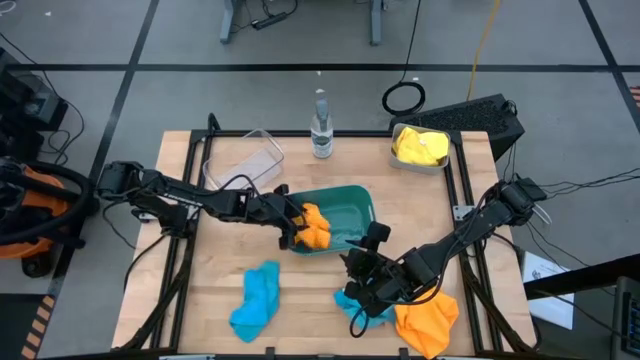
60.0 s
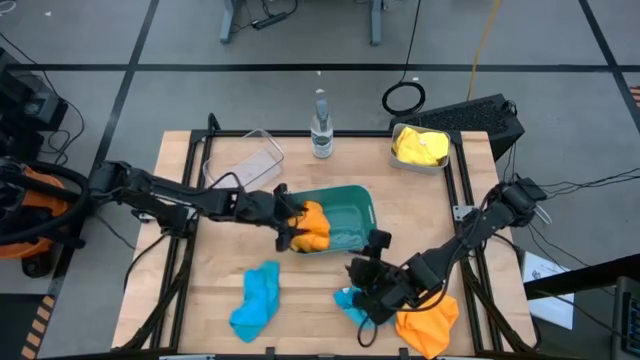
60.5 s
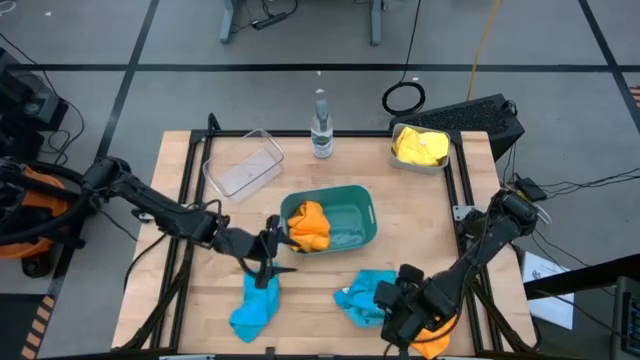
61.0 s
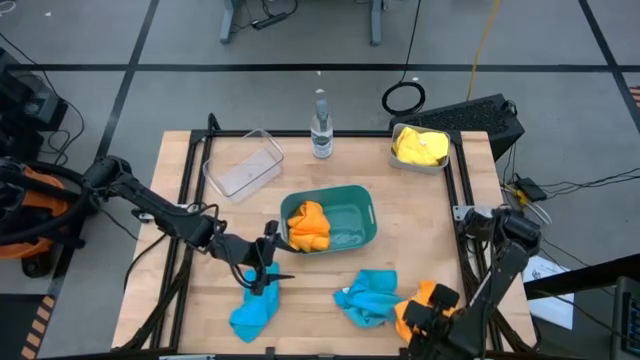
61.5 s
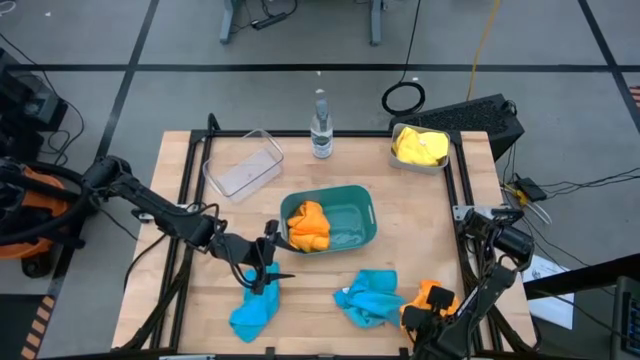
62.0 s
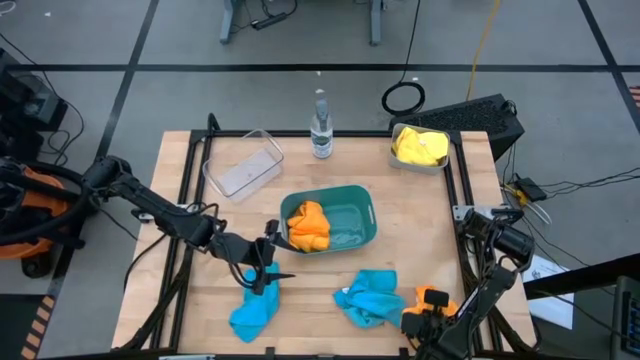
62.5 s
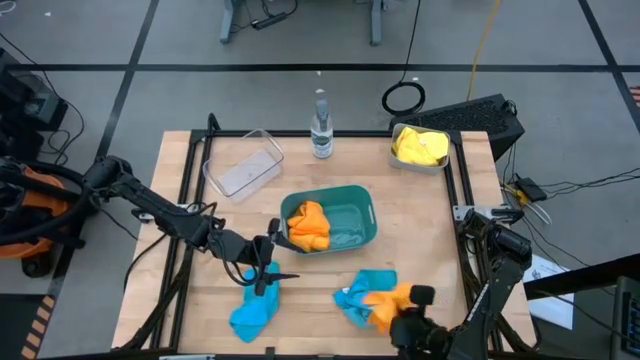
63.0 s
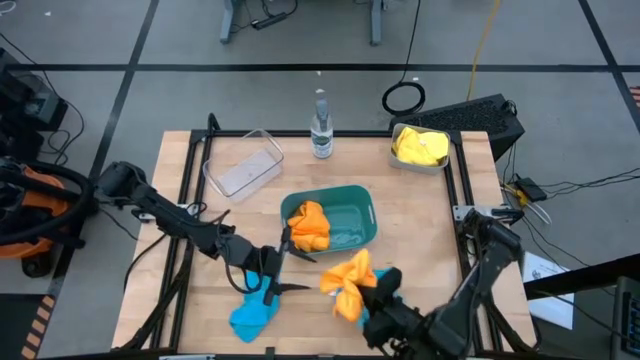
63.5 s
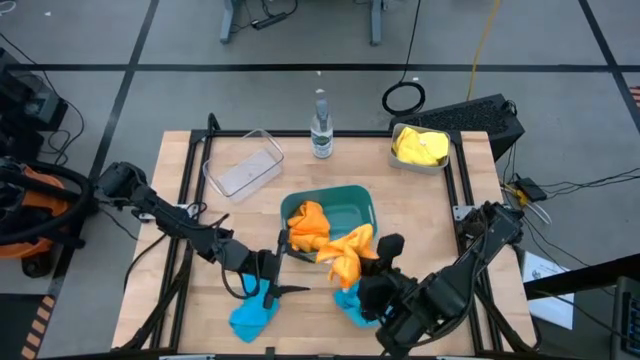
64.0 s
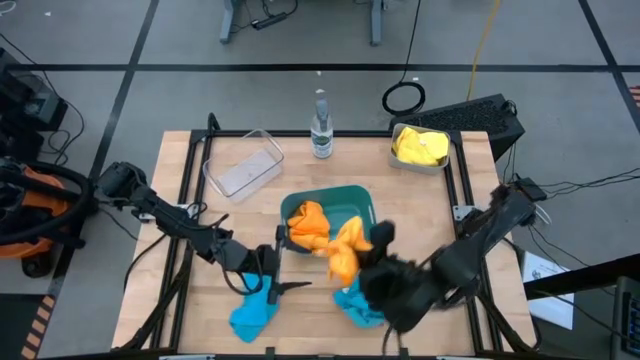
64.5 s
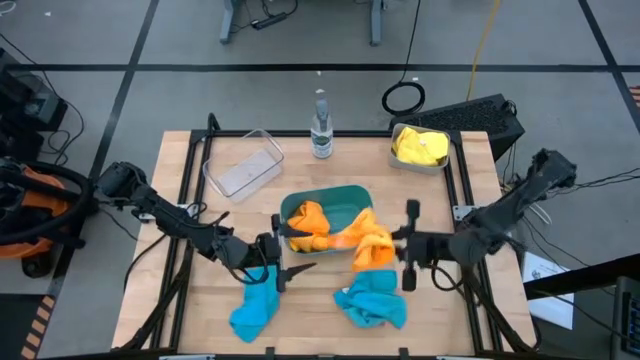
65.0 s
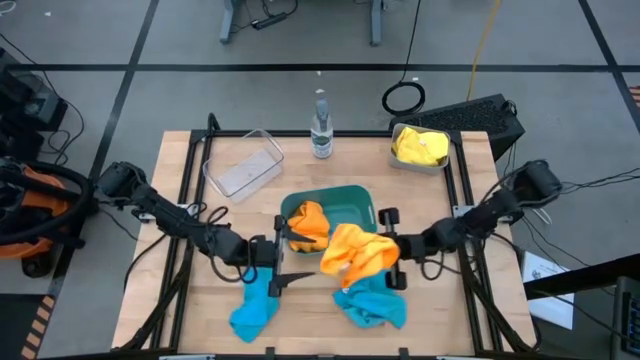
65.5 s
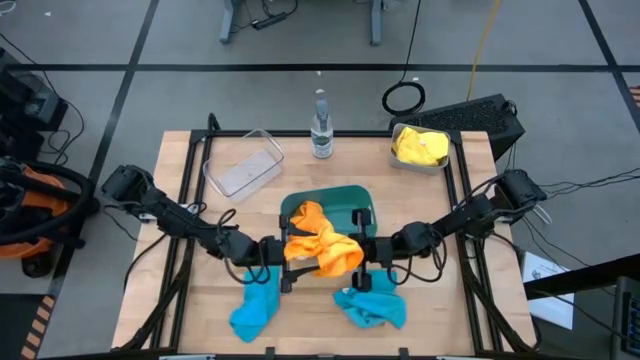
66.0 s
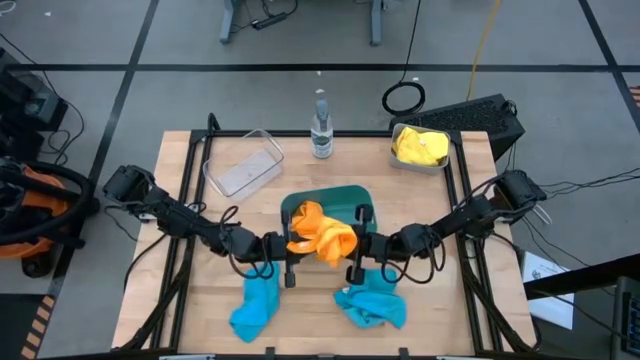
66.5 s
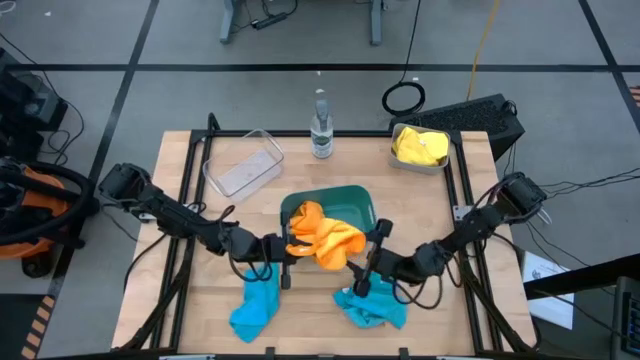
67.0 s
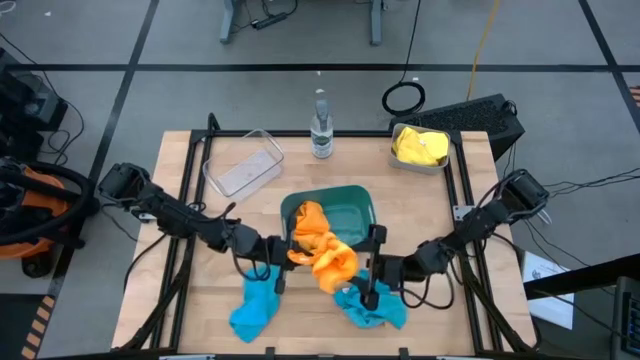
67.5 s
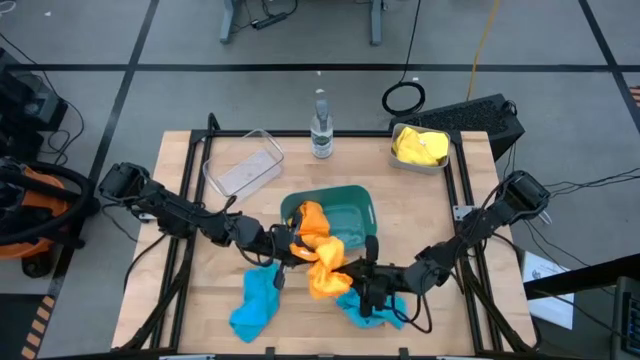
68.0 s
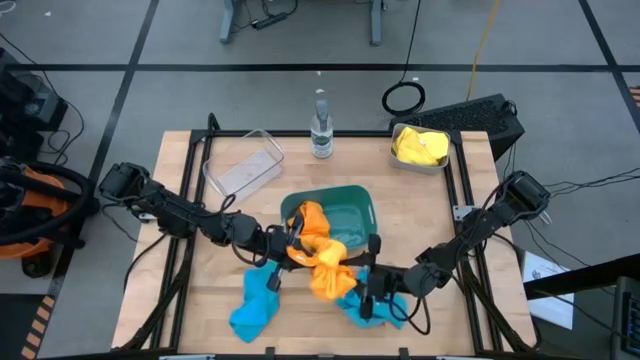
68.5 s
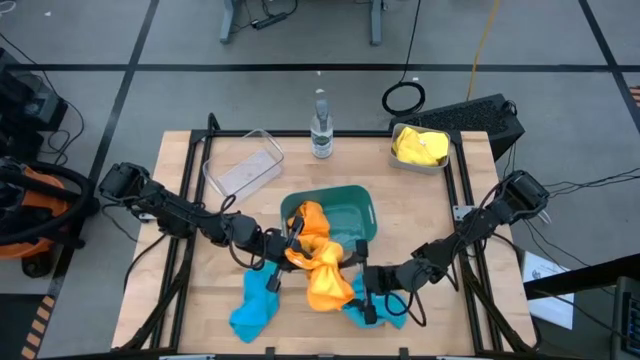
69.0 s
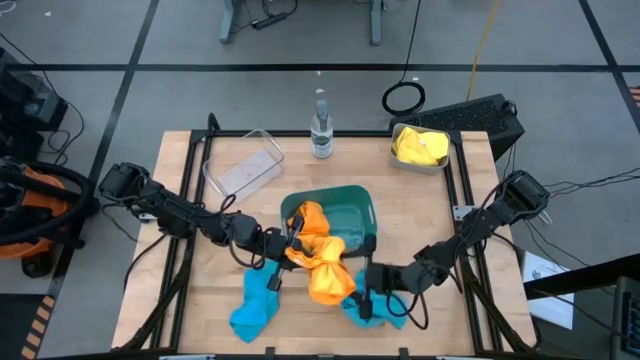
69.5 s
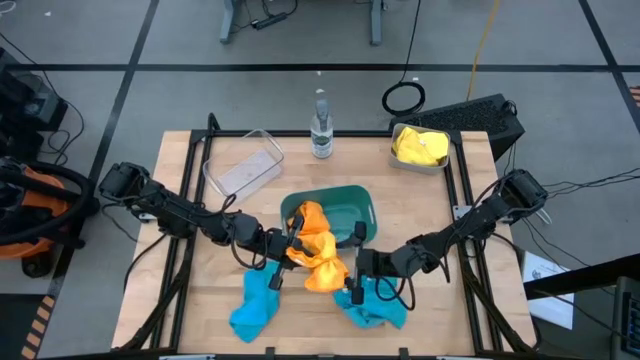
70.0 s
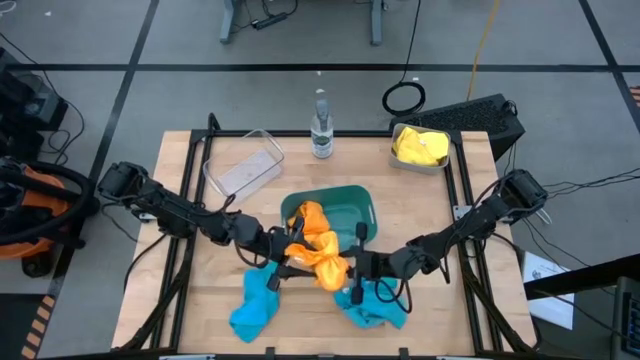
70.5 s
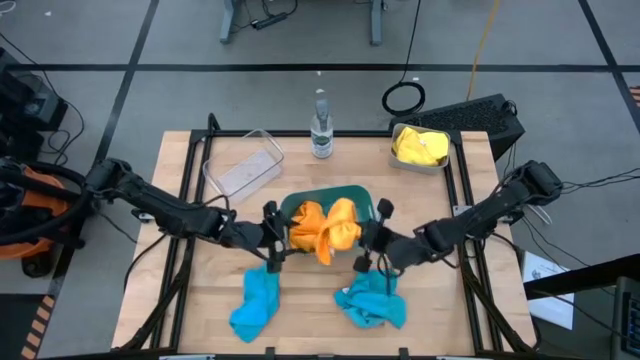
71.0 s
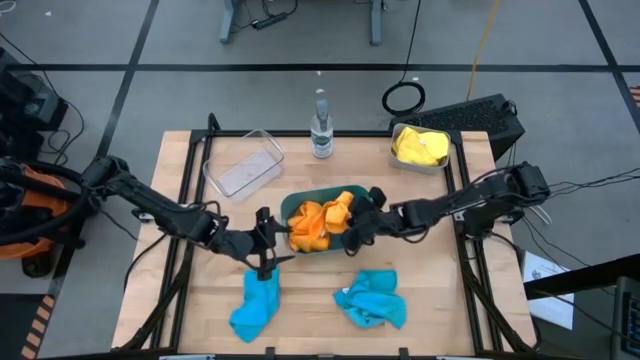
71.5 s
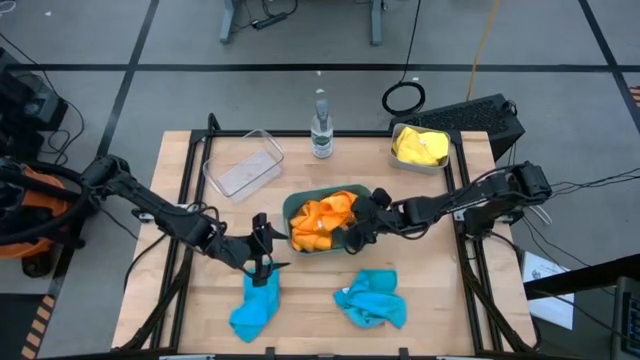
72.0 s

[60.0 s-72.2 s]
Task: Sort microfiber towel by color & place in baskets
Put the orange towel into the green bin

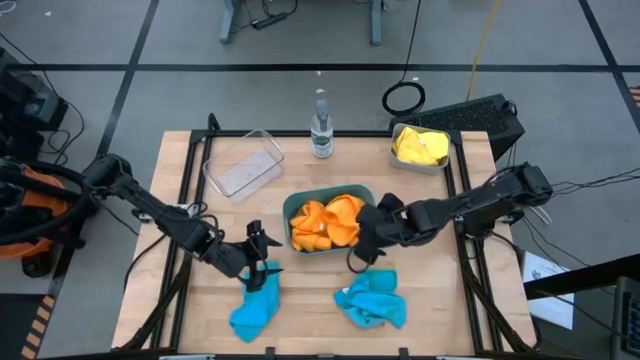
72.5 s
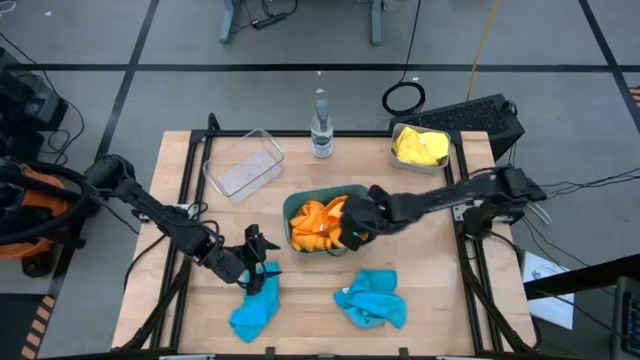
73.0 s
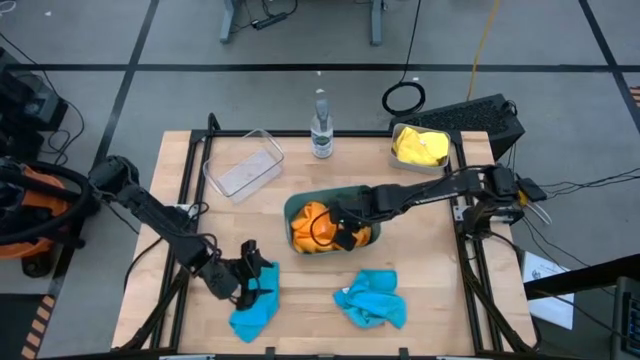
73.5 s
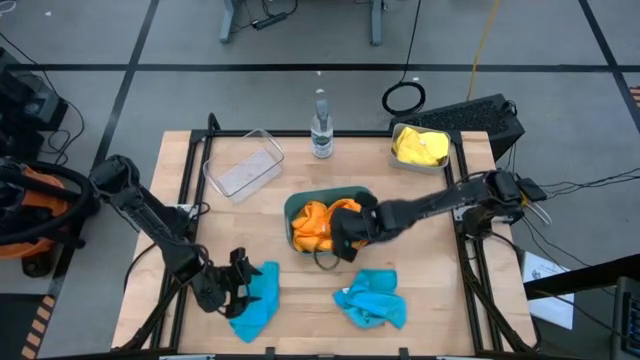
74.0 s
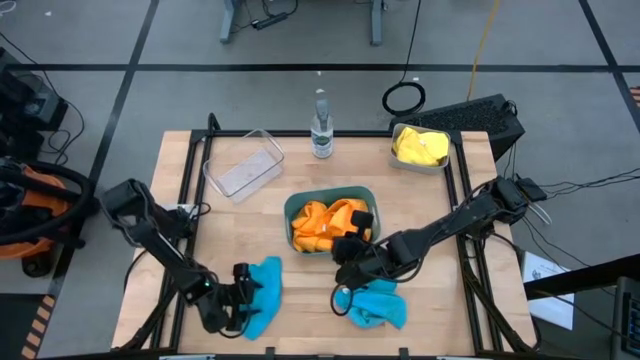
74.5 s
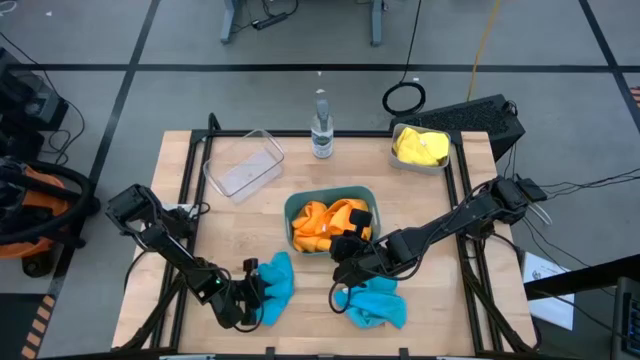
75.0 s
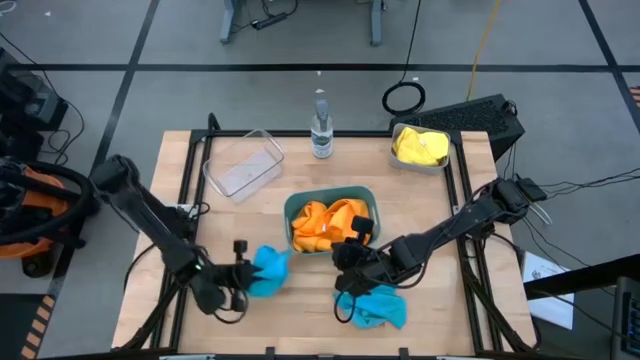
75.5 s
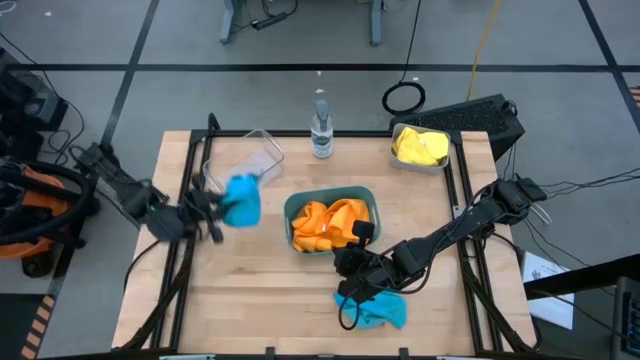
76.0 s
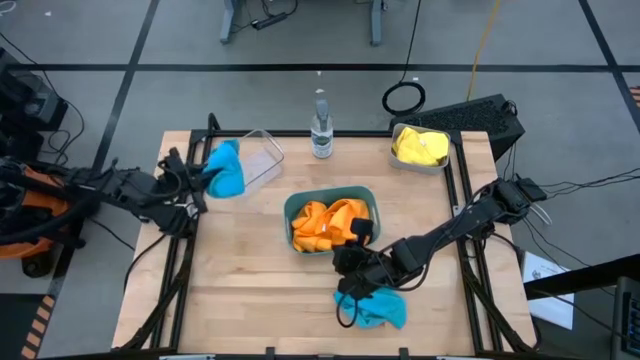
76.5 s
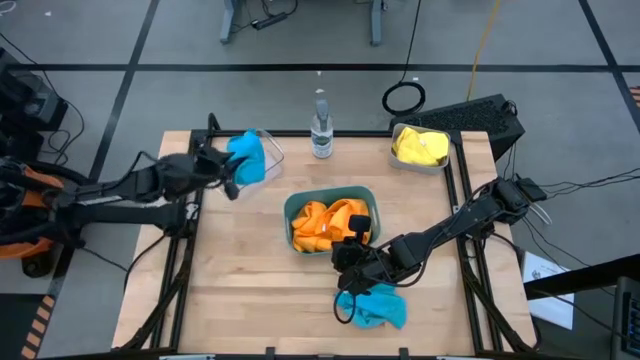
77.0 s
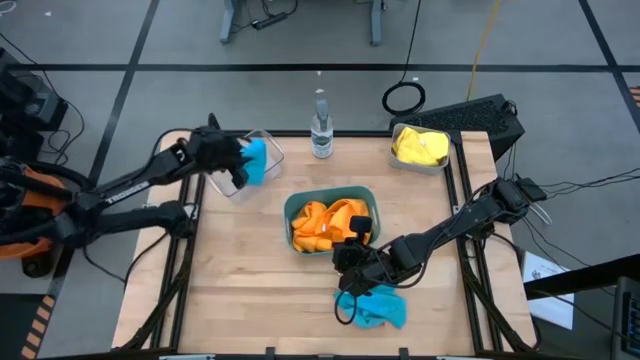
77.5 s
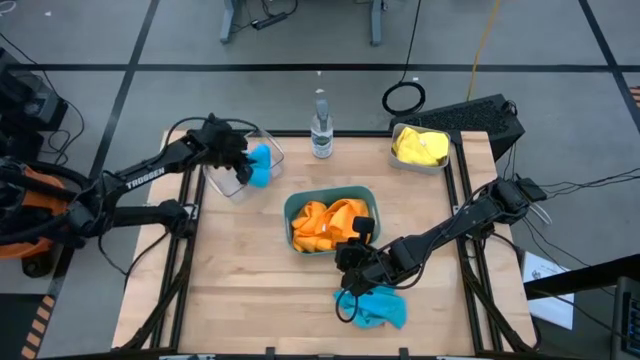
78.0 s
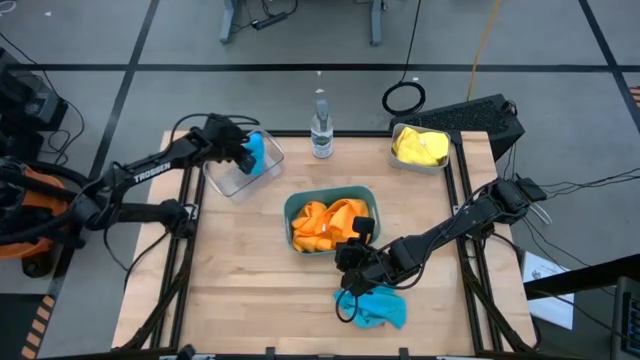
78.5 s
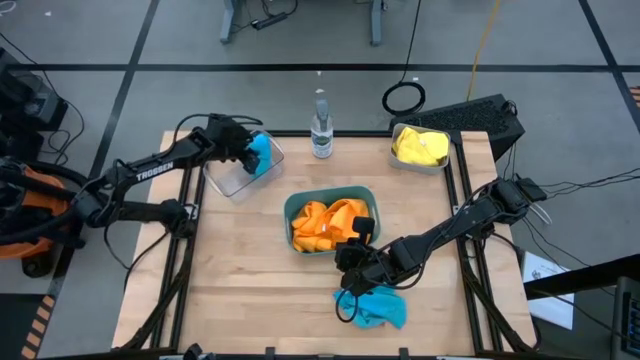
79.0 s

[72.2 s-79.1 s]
Put the left blue towel into the transparent bin

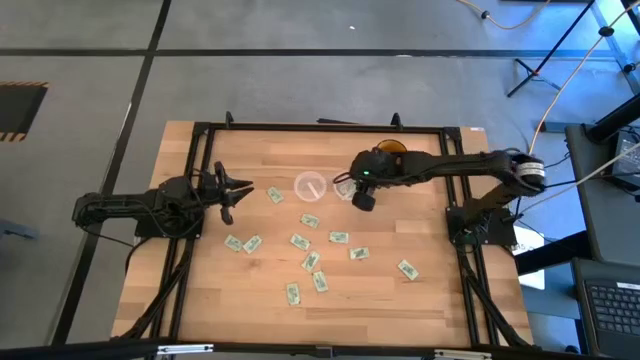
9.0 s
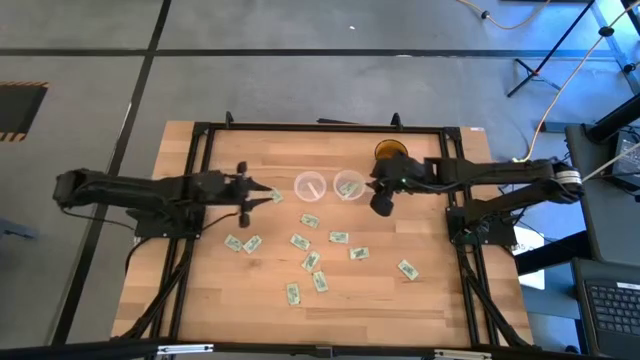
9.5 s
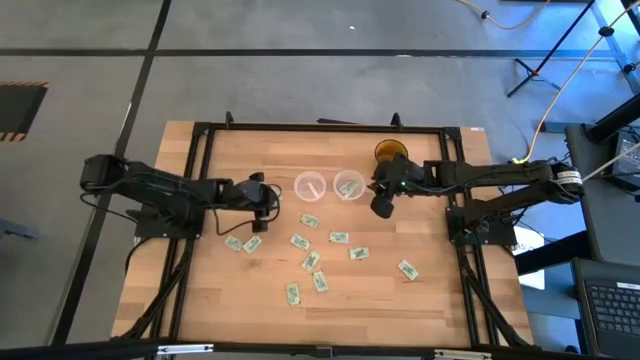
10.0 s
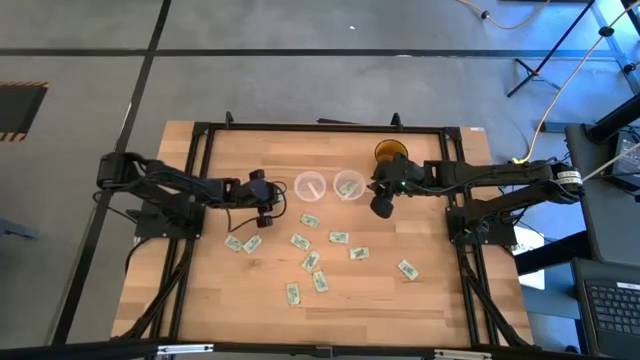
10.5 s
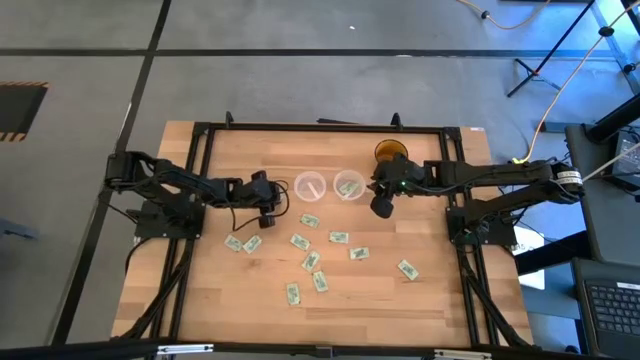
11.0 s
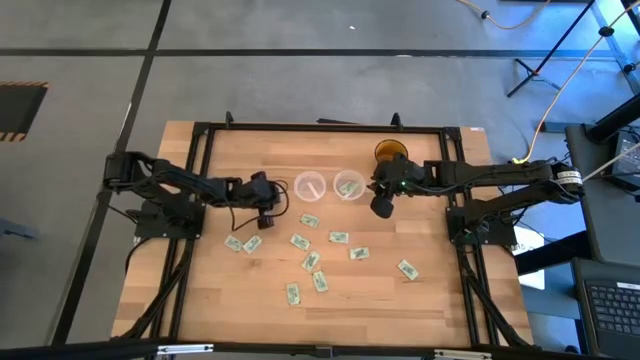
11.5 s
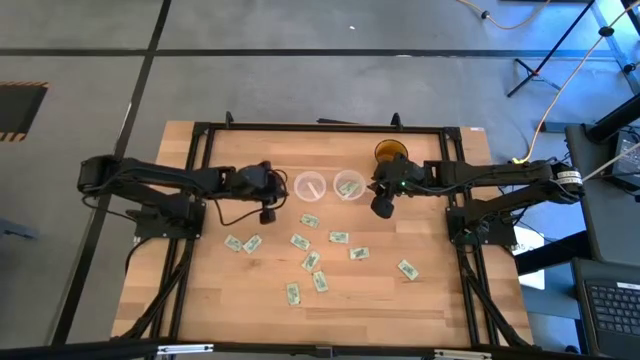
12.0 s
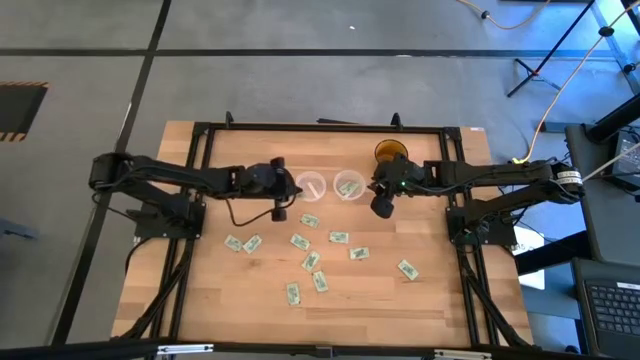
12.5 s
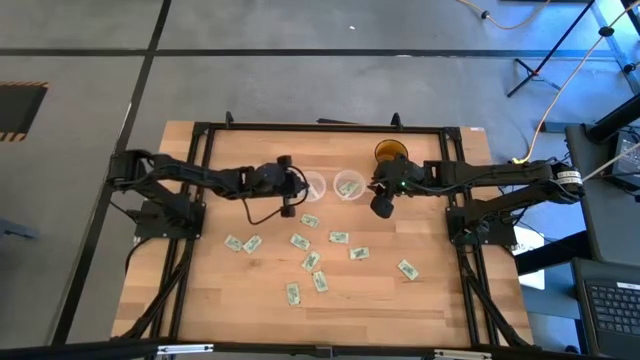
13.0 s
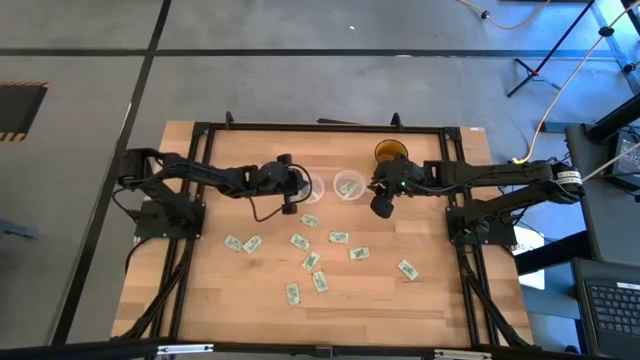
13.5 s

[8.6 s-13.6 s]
Task: Pick and place Stevia / Truvia into bins
Put the stevia packet into the left transparent container
